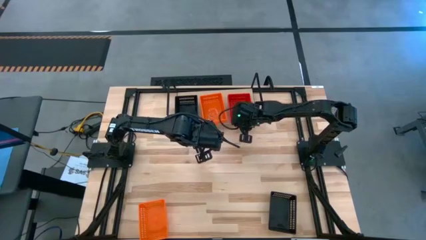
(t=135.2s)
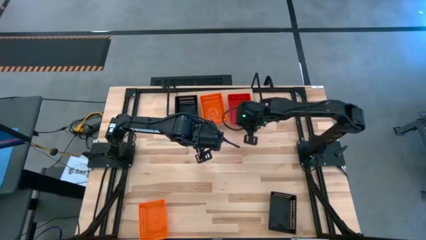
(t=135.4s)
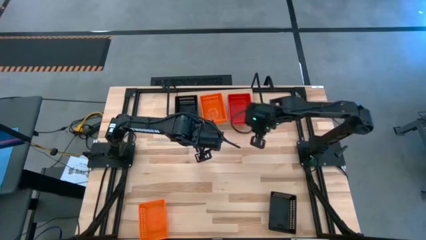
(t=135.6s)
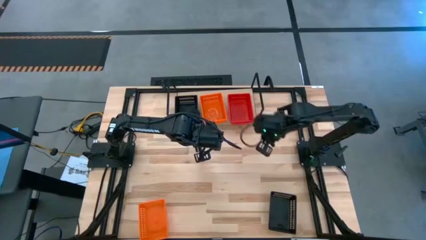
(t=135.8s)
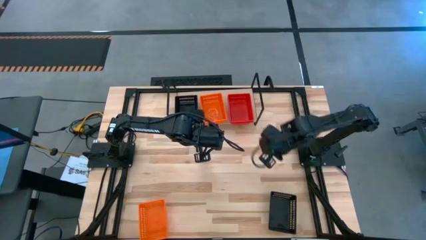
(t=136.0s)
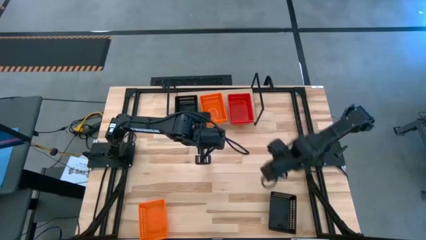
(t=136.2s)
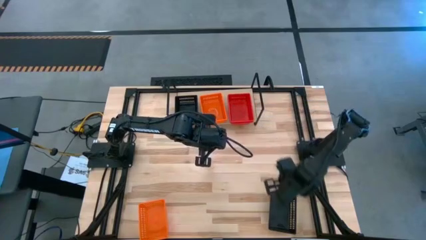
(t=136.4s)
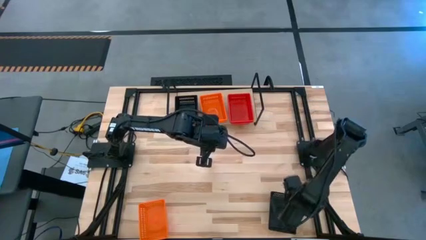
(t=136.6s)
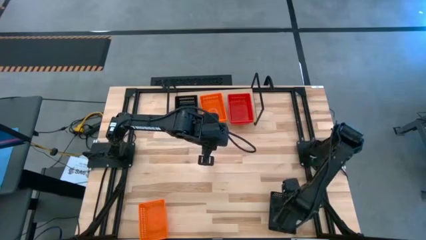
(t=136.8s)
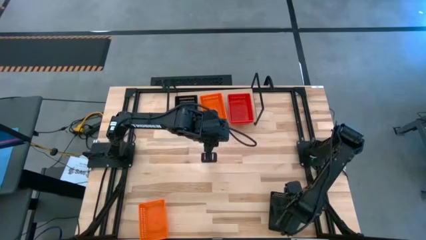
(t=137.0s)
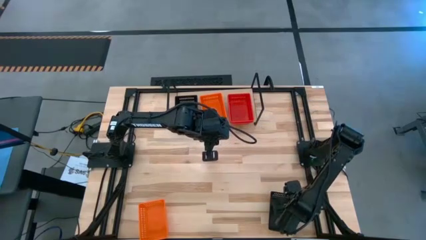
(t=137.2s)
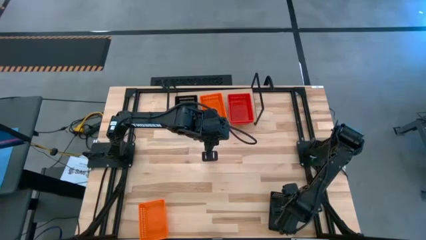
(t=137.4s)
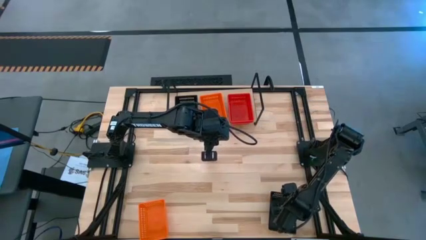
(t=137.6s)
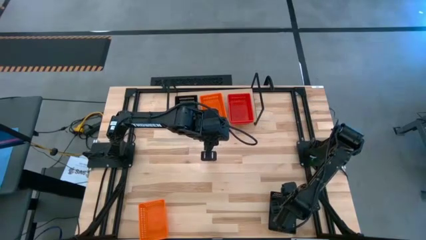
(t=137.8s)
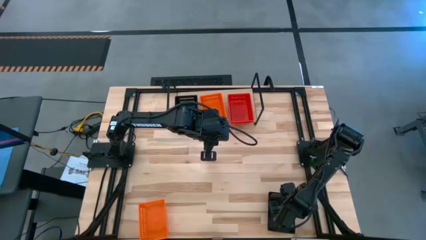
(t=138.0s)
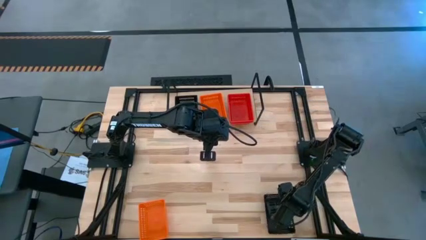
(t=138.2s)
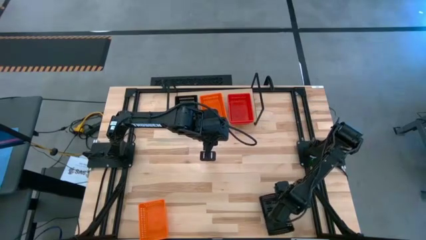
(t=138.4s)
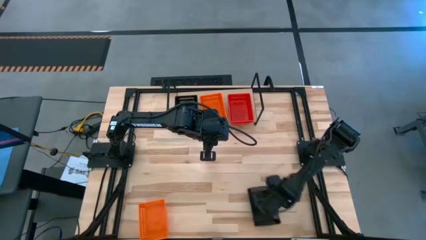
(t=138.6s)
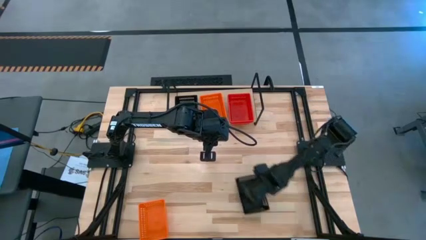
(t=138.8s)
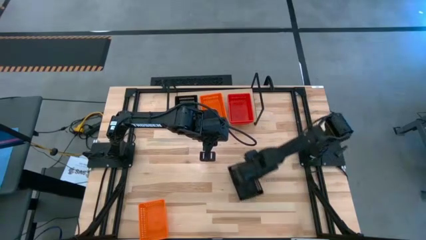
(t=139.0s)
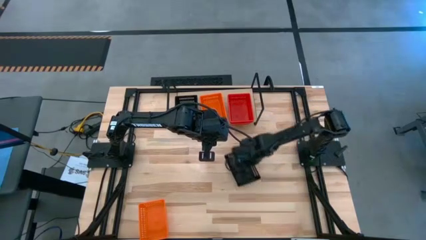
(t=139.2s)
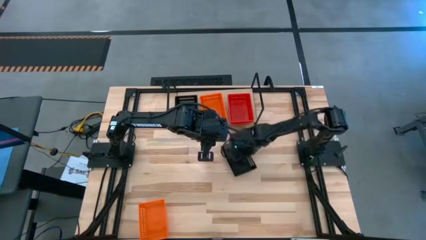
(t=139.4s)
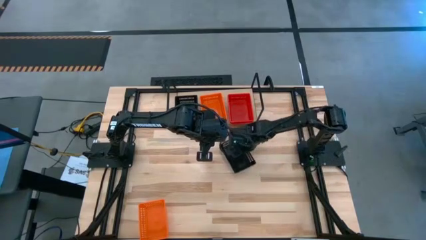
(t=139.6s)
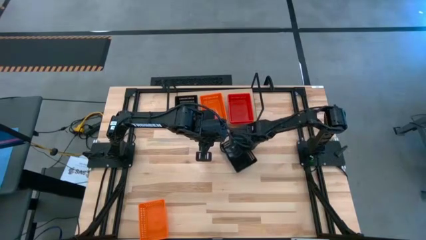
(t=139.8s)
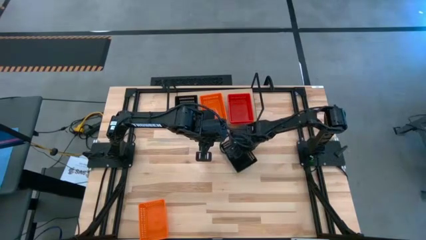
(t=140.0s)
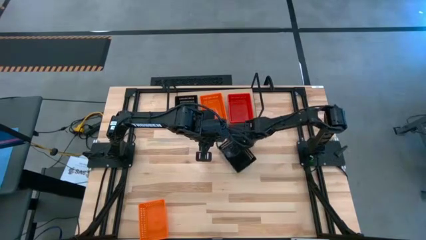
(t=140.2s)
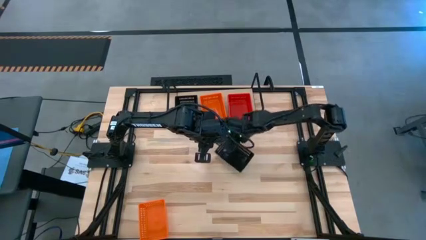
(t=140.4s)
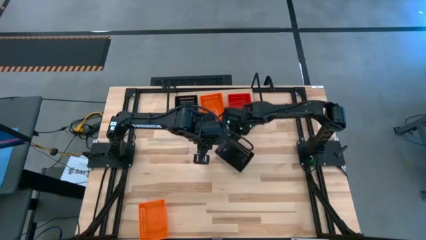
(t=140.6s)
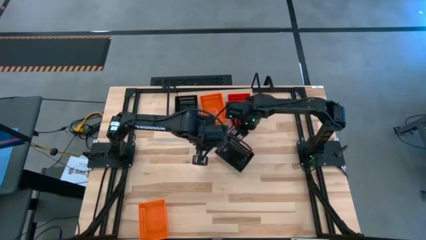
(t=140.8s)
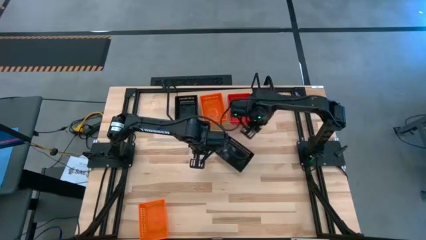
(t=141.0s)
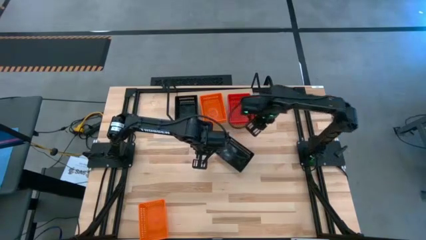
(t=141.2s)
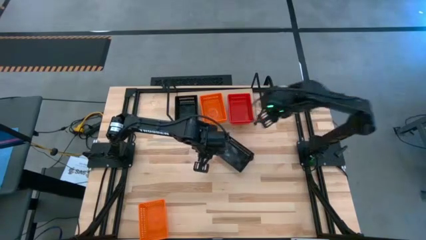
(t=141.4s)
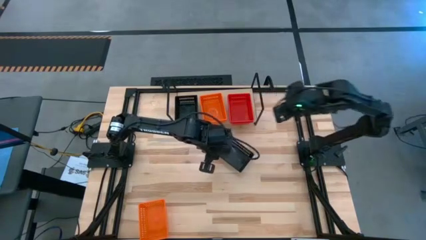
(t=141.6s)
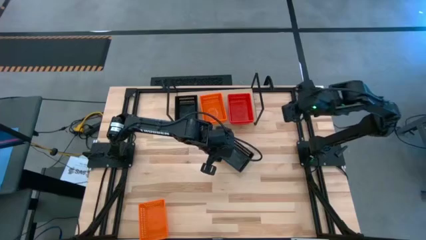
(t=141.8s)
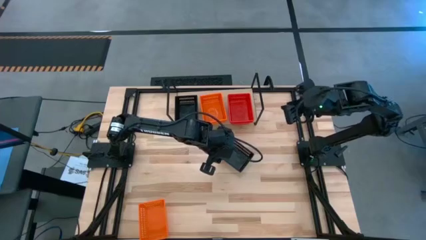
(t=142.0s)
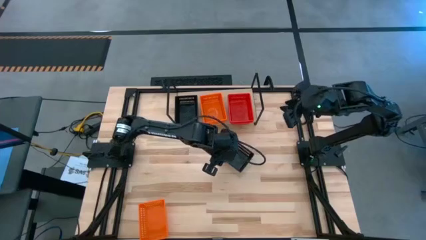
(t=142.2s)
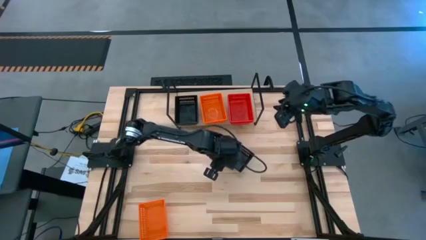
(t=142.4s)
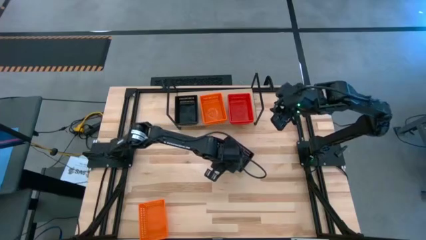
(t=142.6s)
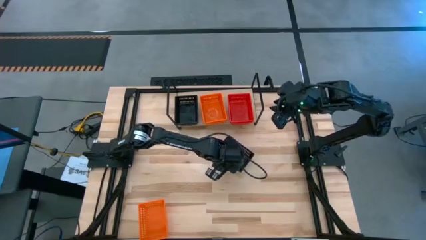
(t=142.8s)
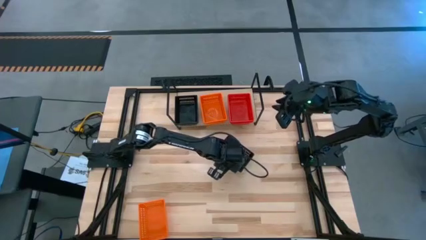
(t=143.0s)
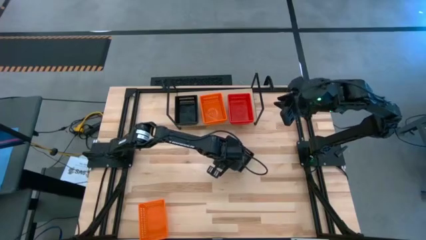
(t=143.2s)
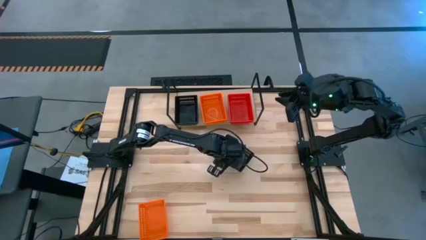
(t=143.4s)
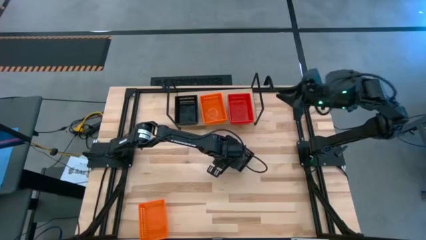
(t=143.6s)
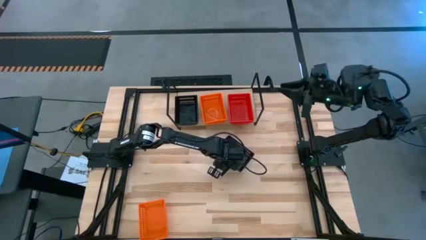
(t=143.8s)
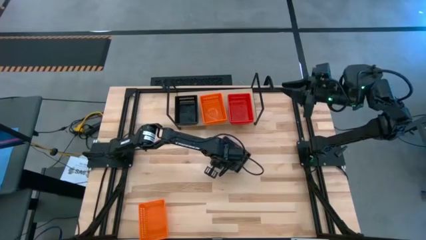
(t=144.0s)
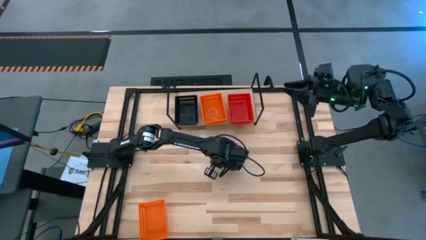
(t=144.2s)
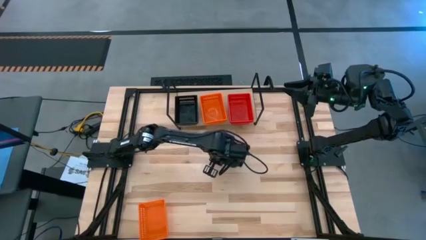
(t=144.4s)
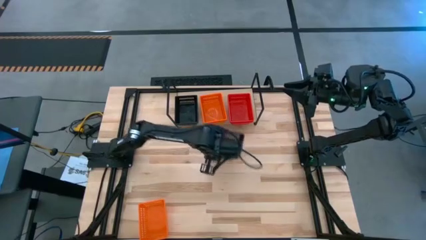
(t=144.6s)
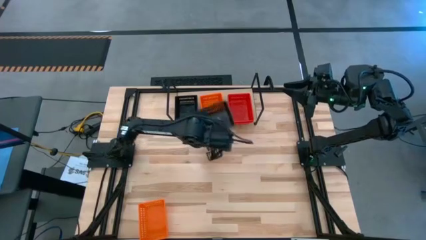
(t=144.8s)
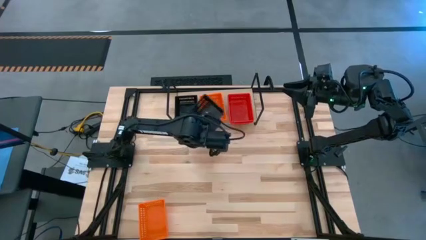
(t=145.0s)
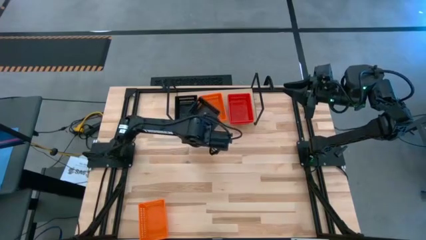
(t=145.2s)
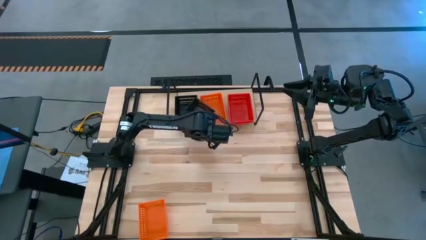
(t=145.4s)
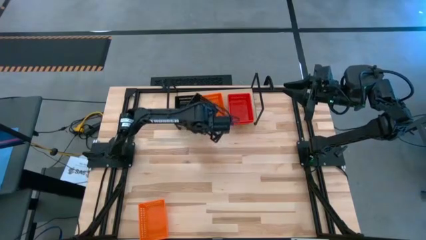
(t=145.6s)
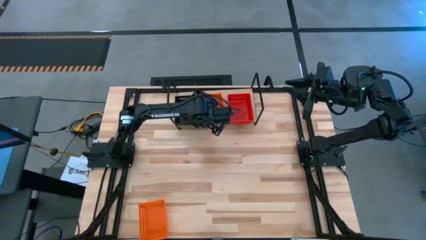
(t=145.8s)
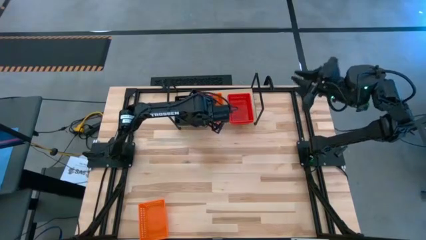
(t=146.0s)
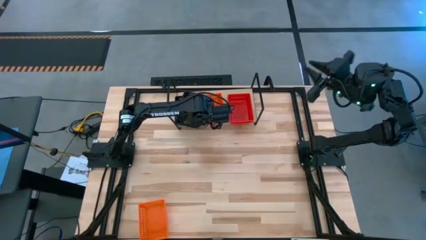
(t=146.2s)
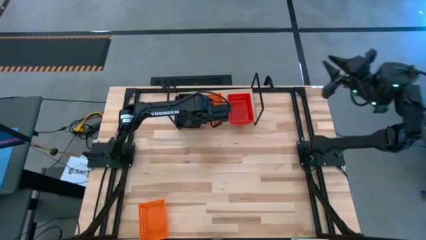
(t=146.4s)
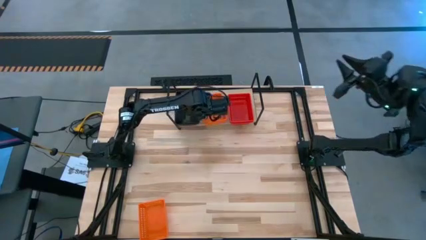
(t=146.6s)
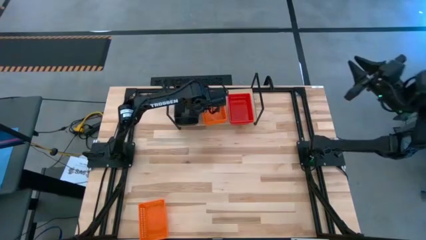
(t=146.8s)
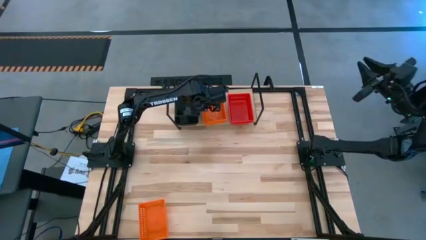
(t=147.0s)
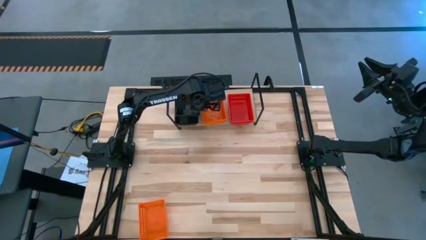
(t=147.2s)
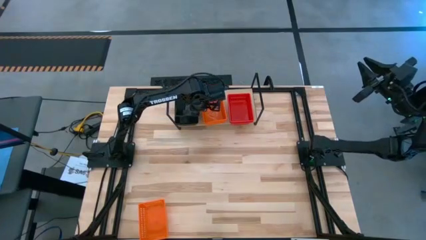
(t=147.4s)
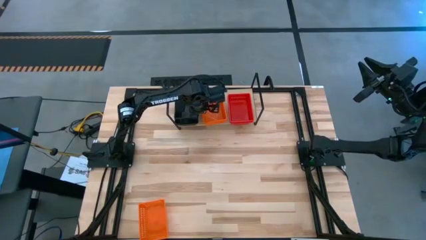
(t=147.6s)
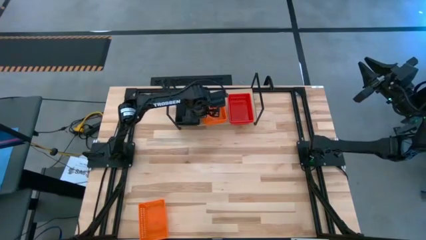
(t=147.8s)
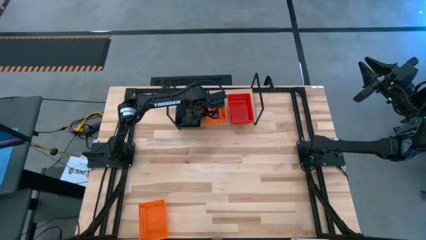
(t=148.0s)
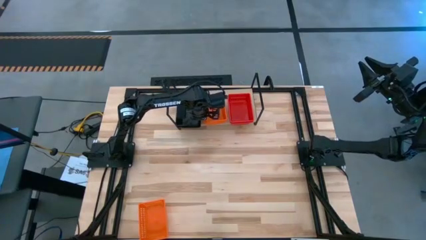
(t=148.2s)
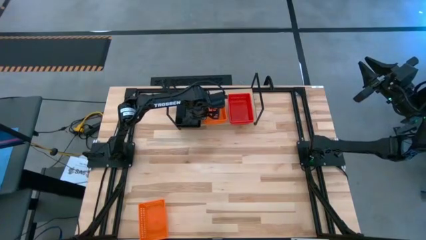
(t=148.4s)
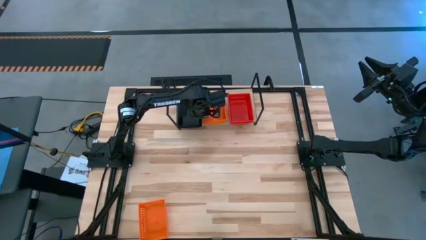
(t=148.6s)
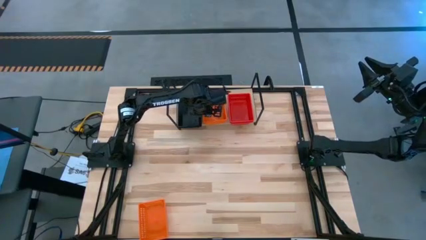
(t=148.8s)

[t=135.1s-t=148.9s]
Task: Stack baskets on shelf by color
Stack the black bin on top of the other black bin on the shelf
